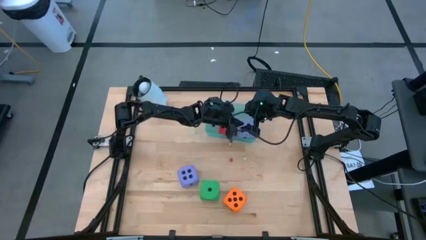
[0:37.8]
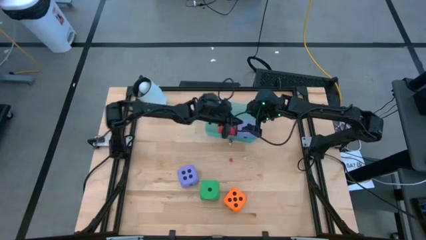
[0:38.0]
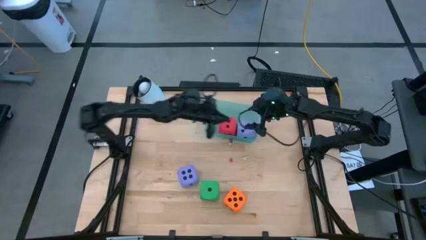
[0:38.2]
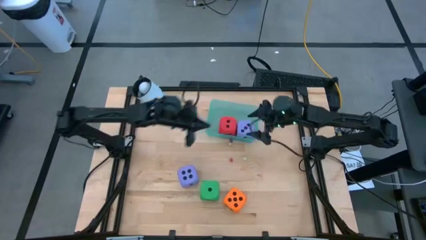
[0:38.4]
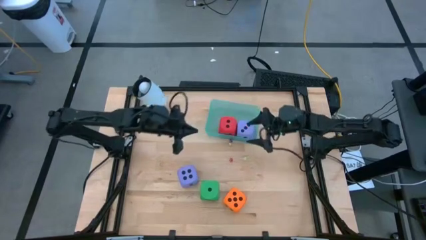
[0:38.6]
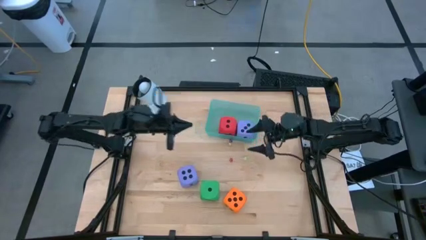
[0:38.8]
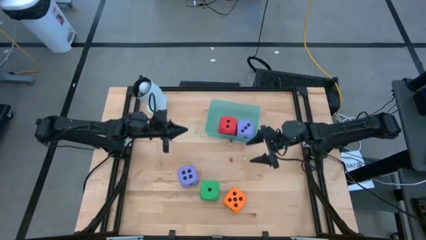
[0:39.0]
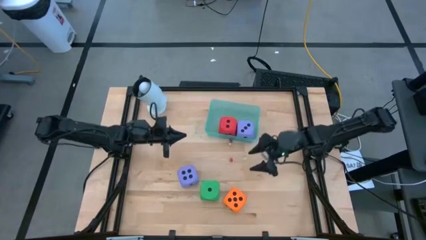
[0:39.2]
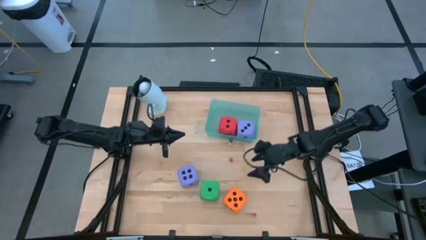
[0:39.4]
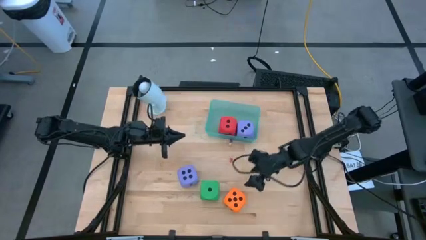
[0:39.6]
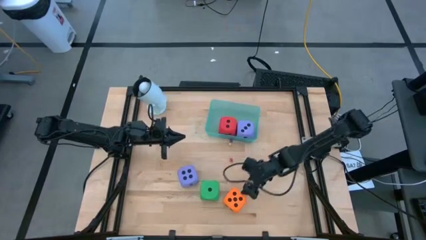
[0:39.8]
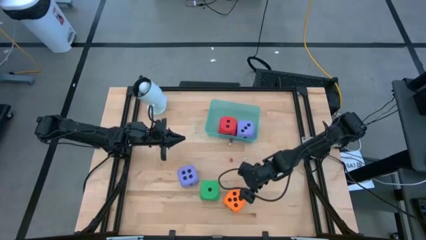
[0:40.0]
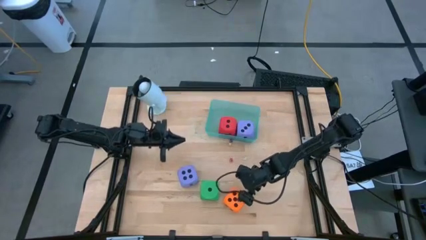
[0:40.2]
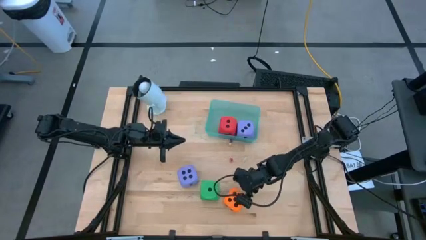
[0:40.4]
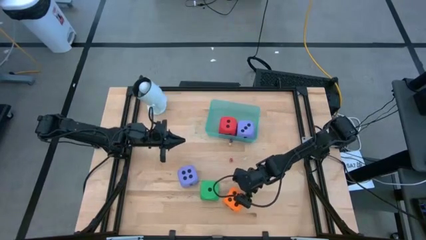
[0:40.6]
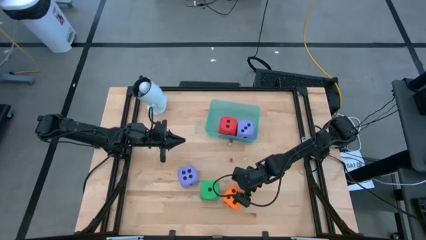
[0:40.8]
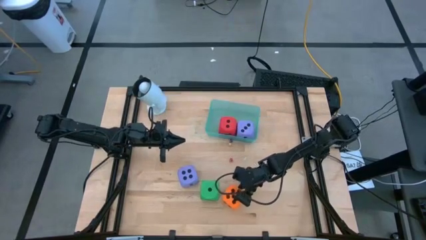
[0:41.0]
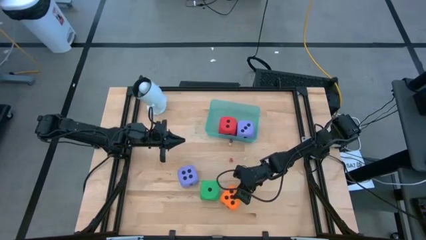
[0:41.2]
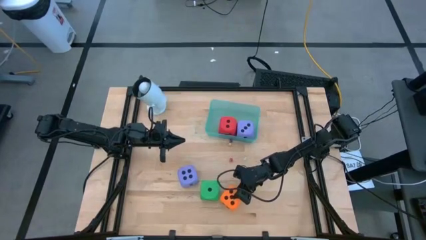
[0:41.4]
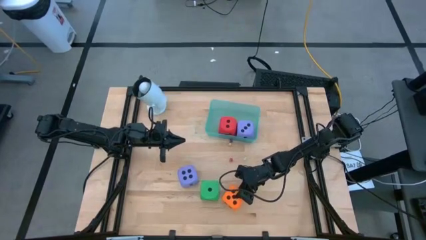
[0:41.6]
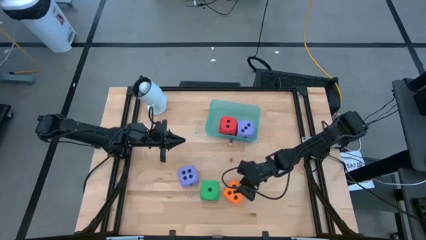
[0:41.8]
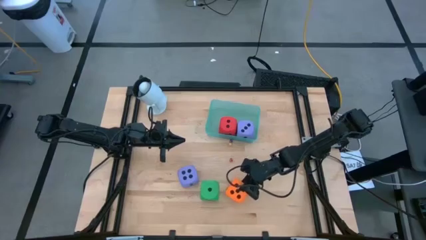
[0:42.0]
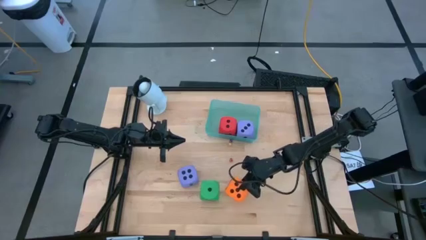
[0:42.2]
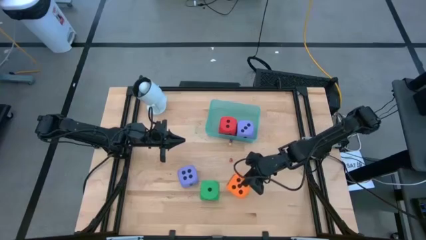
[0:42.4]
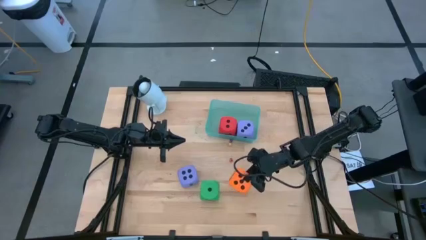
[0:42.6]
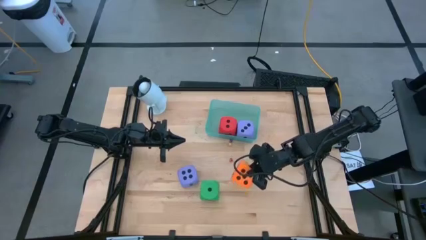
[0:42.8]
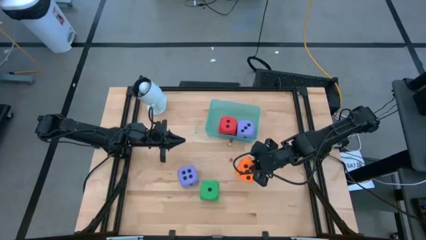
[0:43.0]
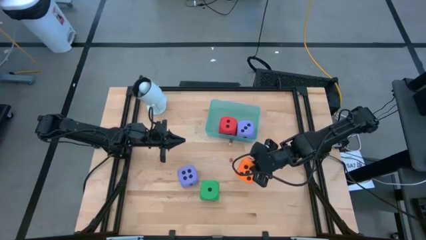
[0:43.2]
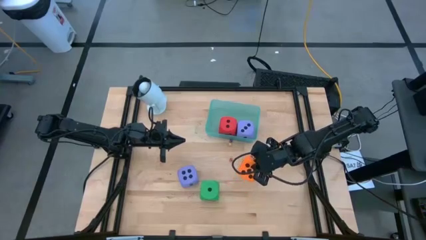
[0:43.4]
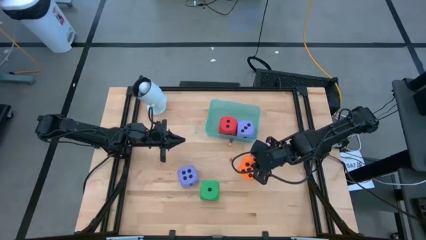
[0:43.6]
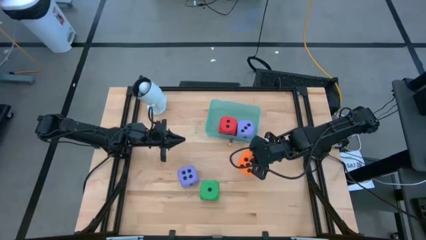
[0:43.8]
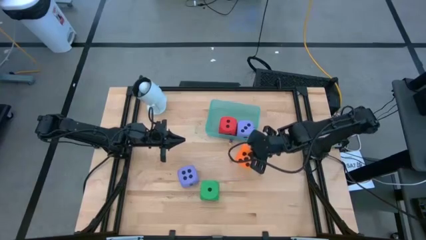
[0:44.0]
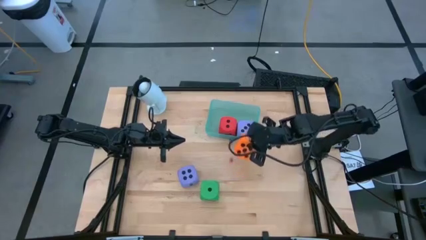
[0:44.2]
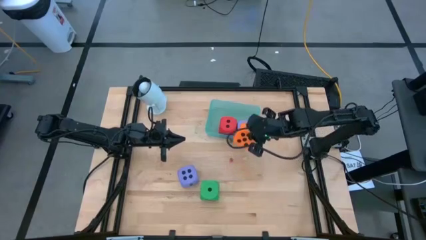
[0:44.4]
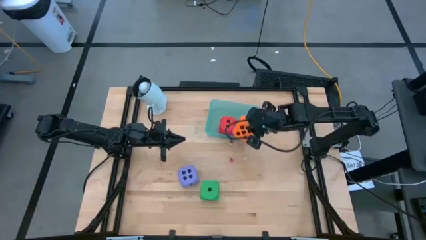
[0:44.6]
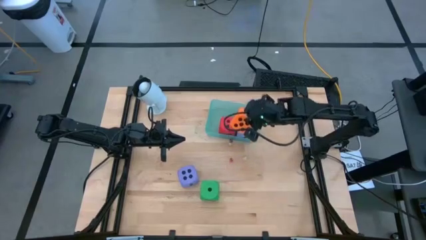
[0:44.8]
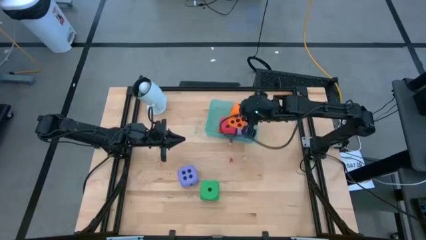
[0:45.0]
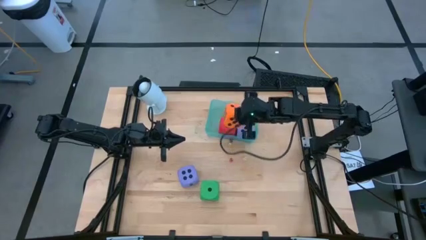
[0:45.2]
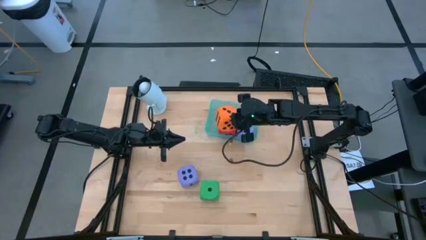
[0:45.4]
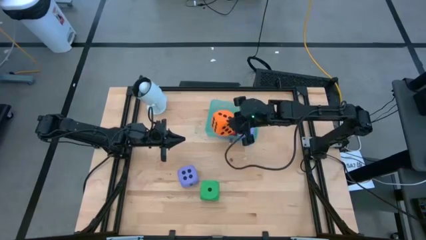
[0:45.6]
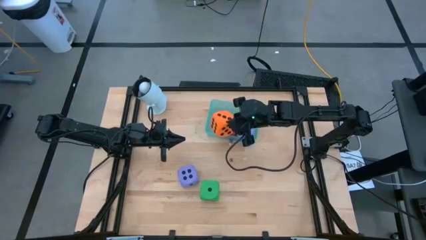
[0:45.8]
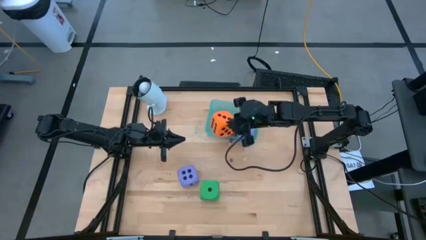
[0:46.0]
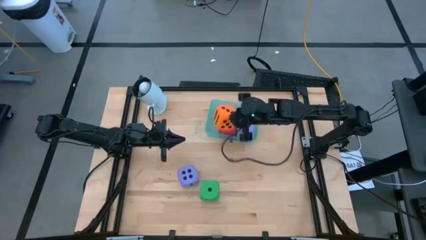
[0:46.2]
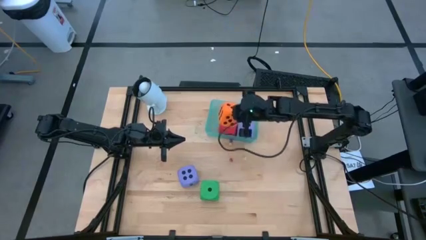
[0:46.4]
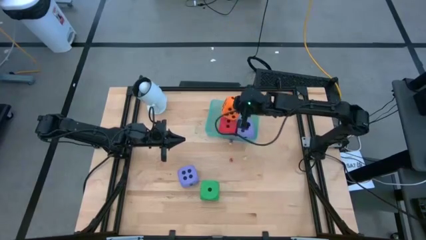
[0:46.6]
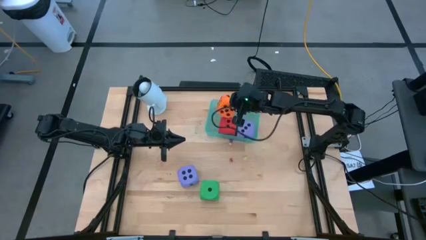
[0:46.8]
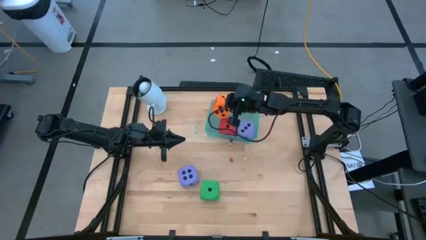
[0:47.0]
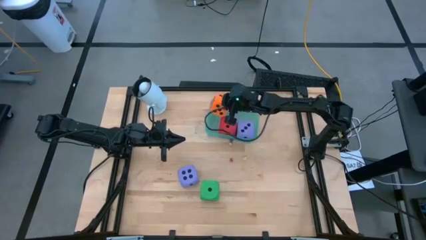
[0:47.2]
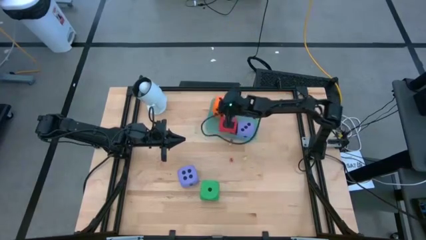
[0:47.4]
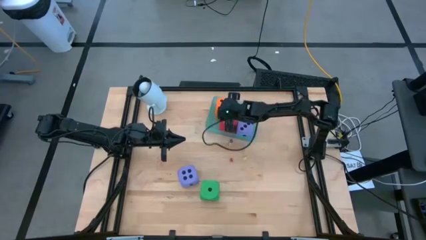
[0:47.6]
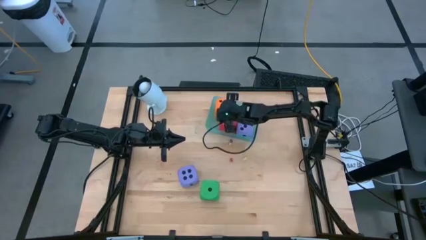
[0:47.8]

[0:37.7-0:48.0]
Task: Pick & Place Dice
Put the large orange die into the blue bin

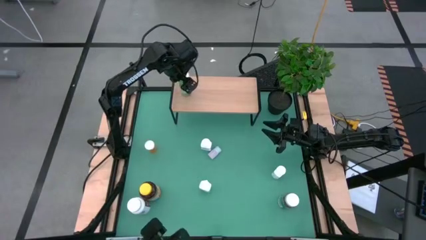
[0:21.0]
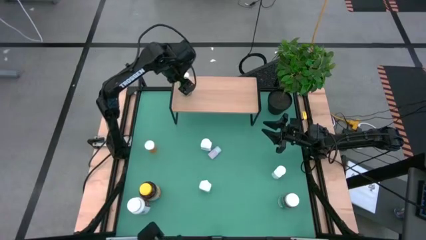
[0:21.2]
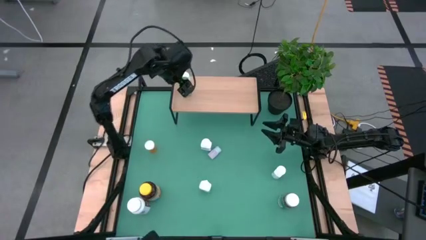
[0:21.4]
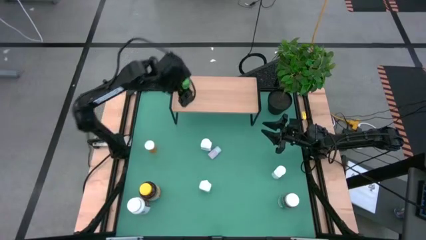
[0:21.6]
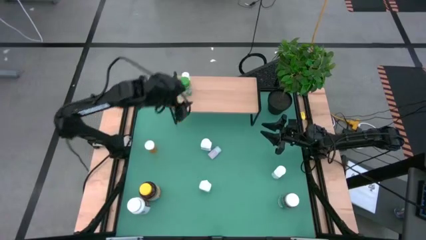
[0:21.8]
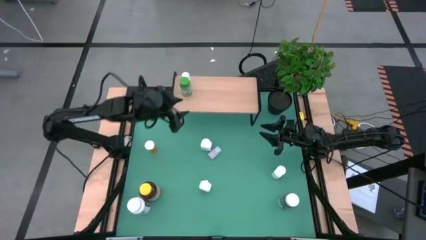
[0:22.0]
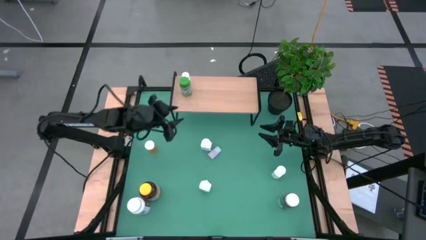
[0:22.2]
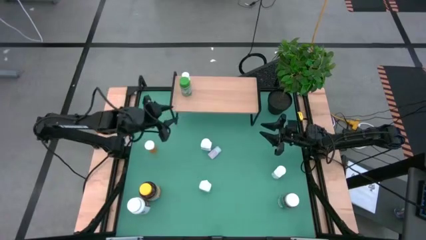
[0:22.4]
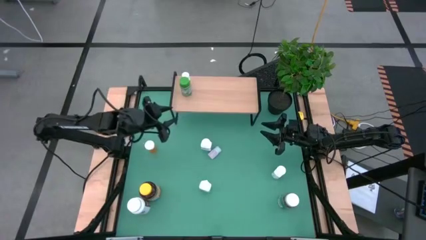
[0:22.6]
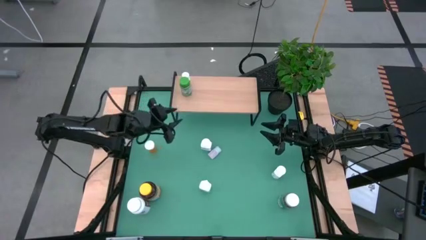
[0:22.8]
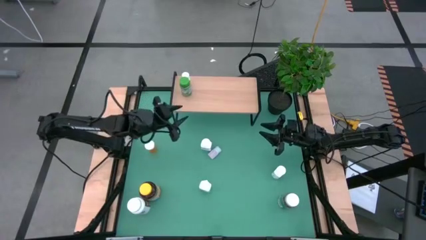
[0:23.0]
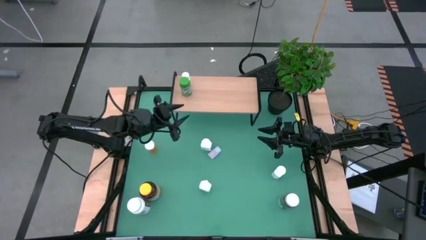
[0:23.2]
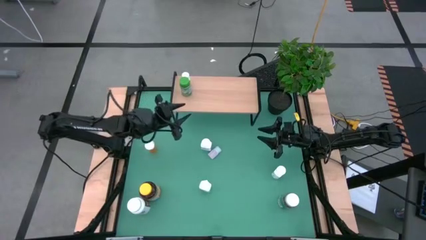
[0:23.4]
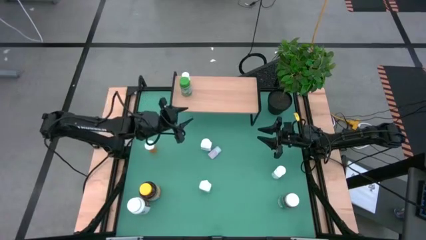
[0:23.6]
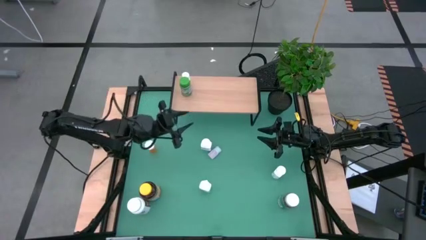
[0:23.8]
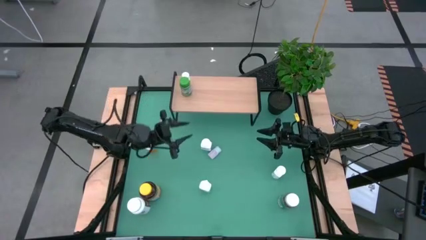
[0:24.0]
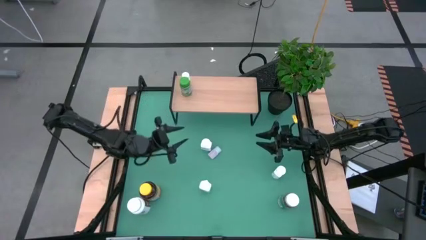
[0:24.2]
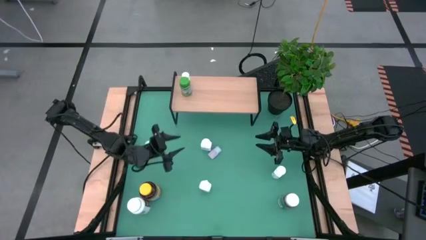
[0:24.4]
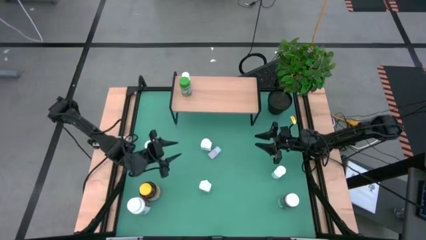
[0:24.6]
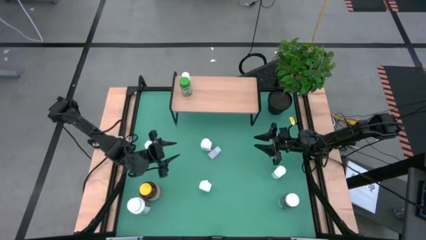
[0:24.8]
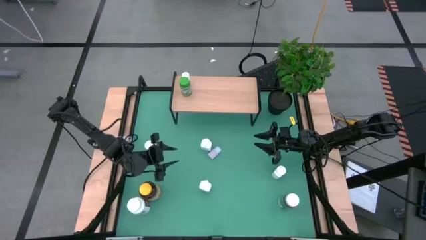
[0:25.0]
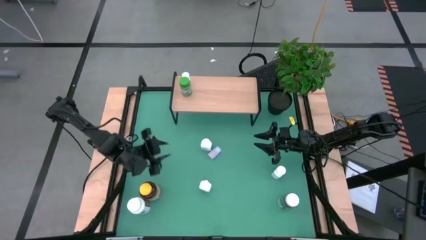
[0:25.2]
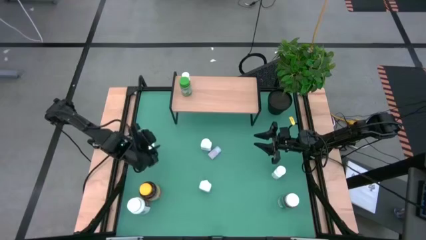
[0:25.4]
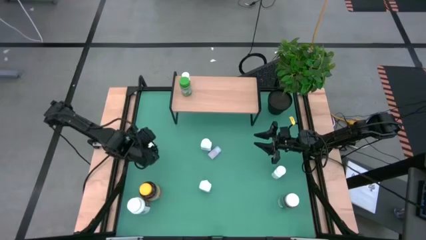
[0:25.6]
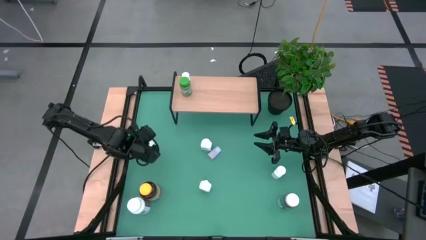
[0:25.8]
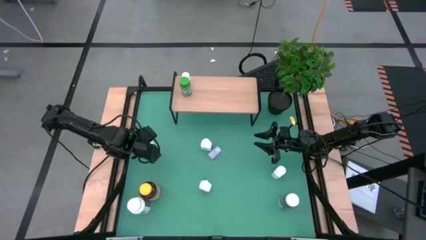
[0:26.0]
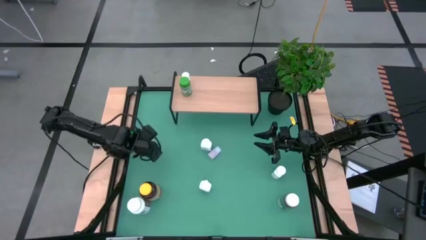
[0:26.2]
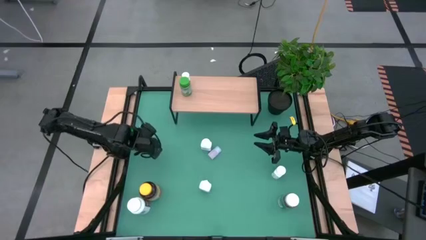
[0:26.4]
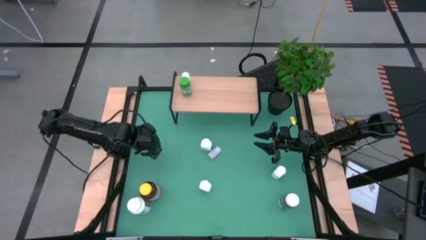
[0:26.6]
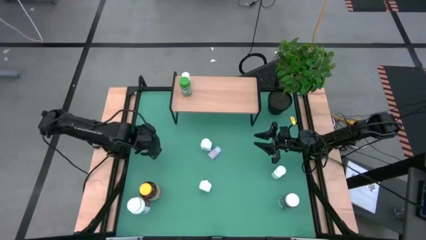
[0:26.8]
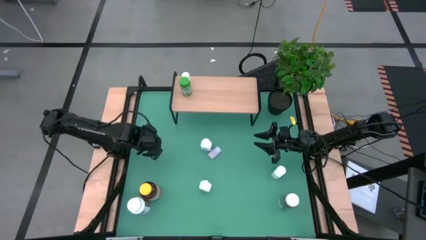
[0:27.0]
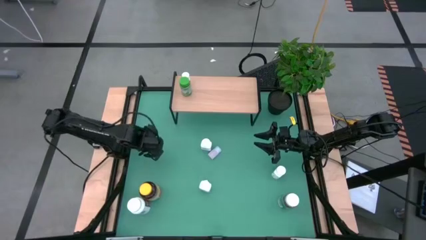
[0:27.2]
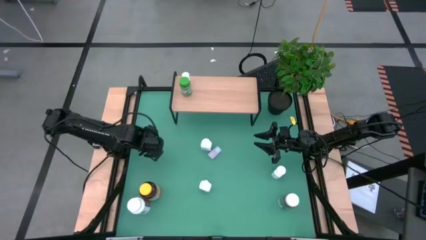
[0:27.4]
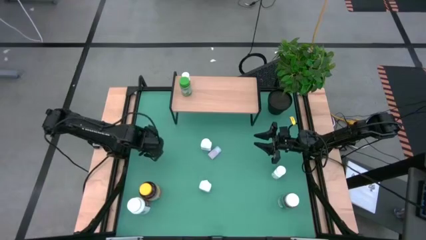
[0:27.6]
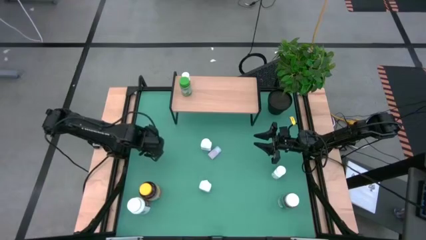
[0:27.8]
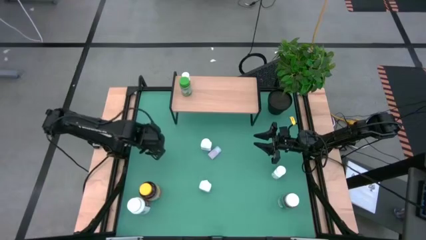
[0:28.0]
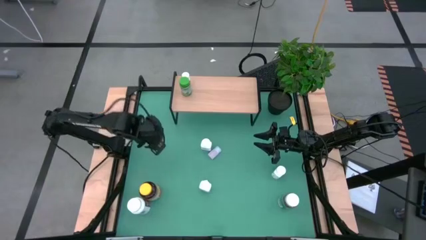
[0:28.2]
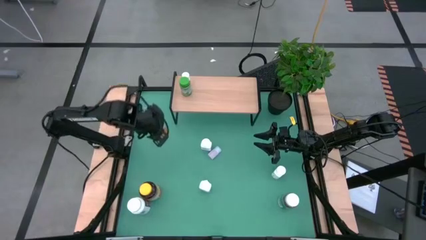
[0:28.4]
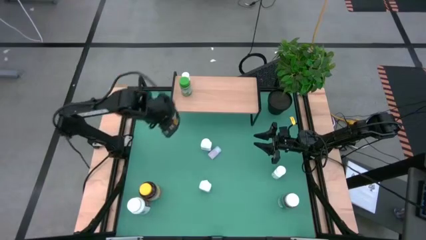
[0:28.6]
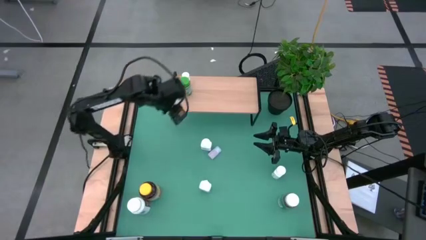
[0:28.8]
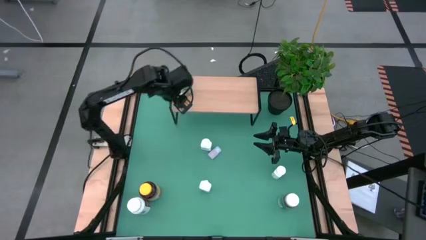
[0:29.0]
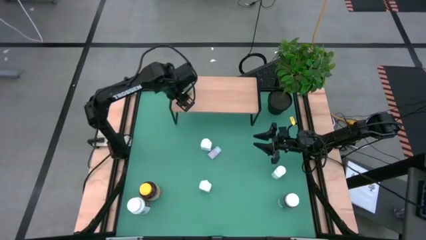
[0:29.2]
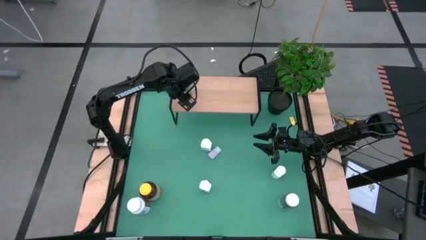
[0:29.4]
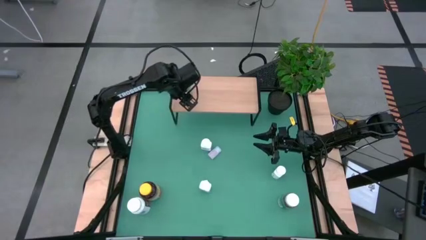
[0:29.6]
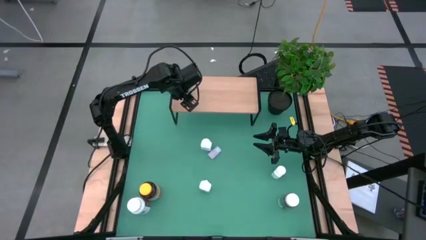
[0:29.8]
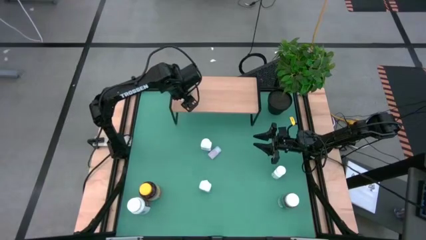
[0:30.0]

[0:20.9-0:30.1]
Task: Pick and place medicine bottles onto shelf by color
Put the orange bottle on the shelf
